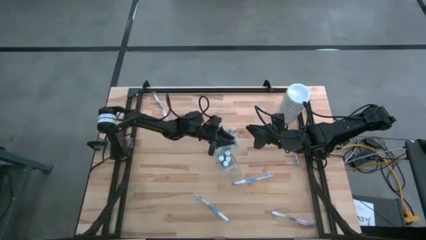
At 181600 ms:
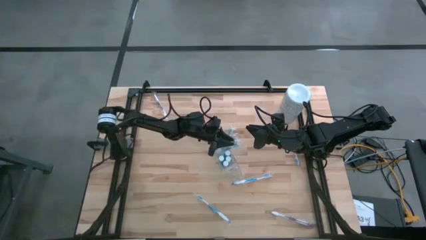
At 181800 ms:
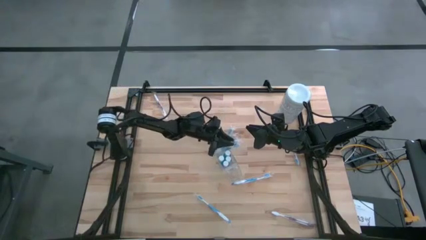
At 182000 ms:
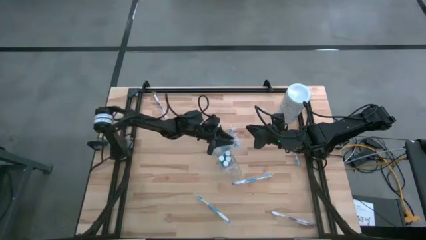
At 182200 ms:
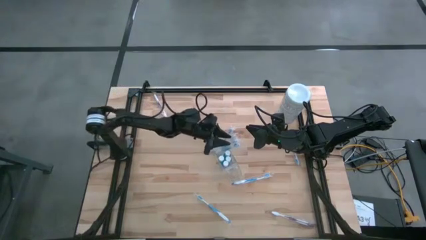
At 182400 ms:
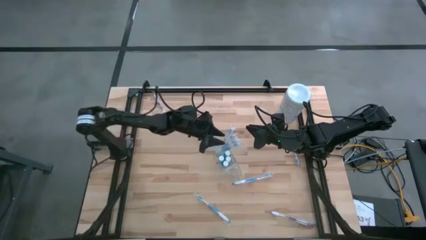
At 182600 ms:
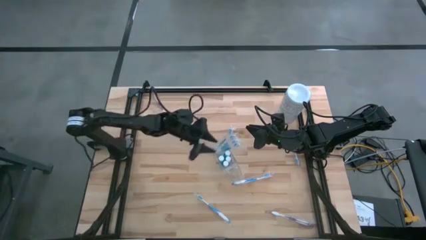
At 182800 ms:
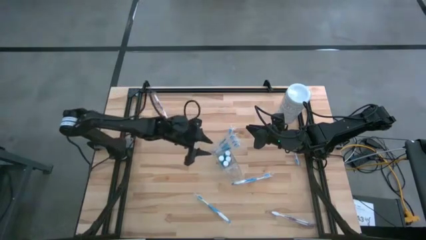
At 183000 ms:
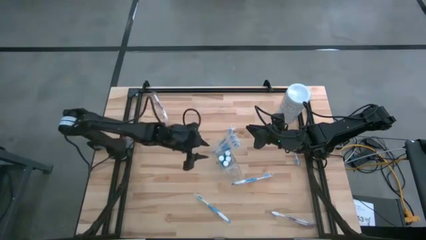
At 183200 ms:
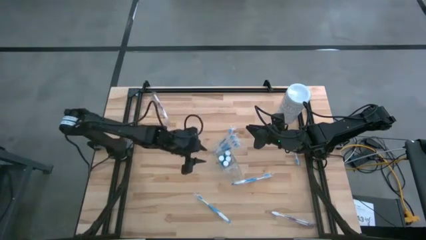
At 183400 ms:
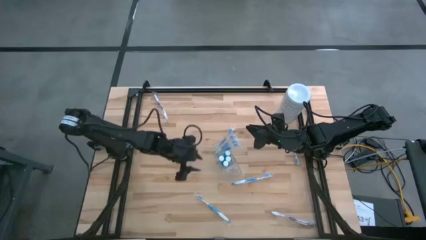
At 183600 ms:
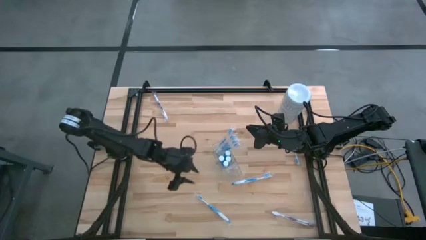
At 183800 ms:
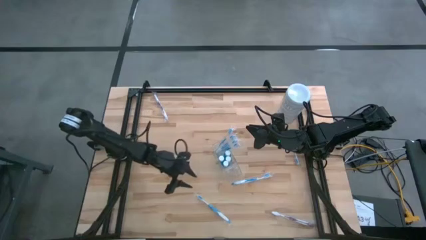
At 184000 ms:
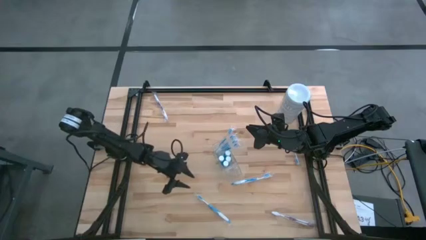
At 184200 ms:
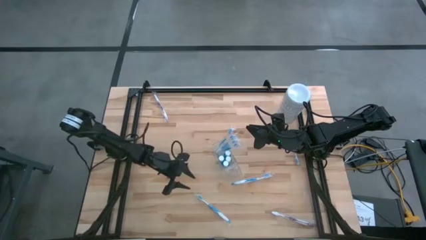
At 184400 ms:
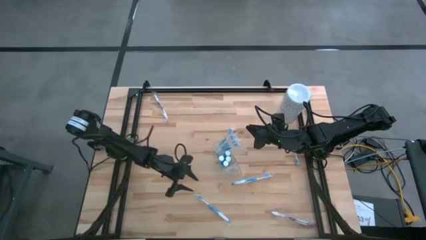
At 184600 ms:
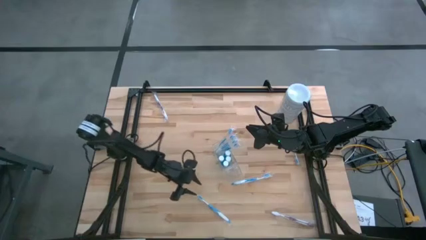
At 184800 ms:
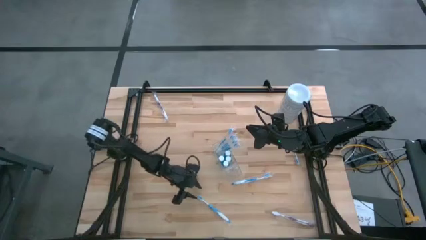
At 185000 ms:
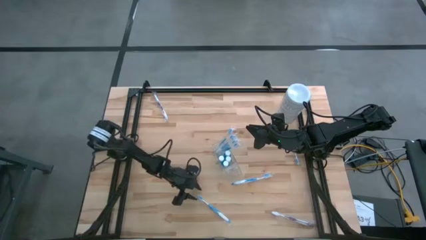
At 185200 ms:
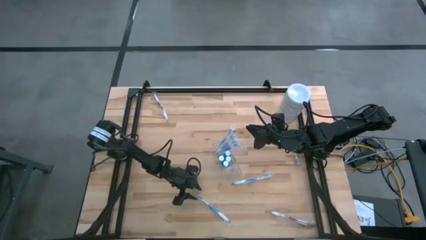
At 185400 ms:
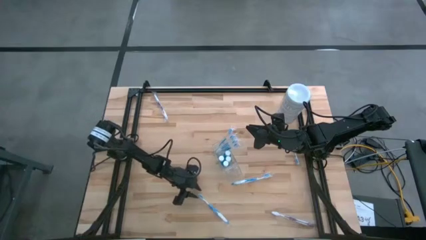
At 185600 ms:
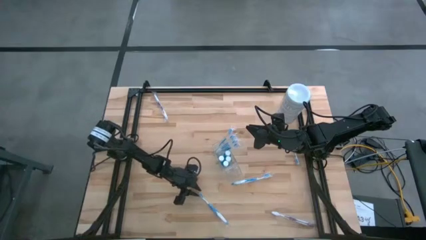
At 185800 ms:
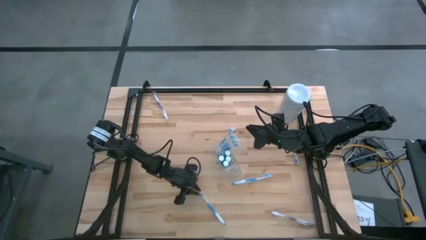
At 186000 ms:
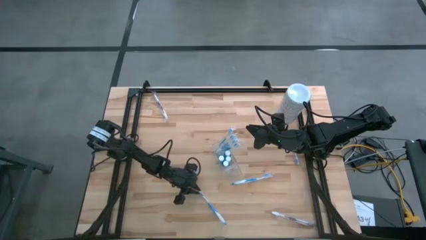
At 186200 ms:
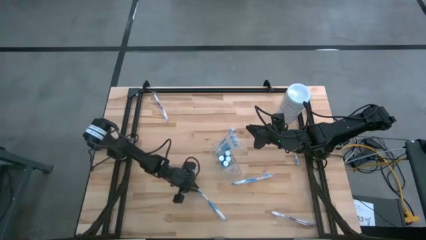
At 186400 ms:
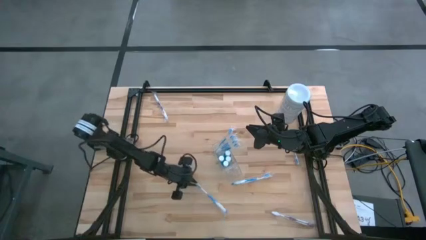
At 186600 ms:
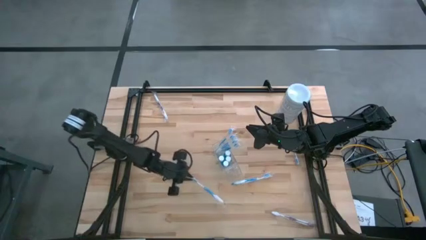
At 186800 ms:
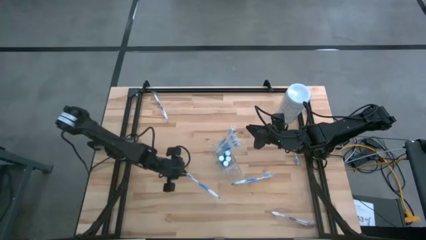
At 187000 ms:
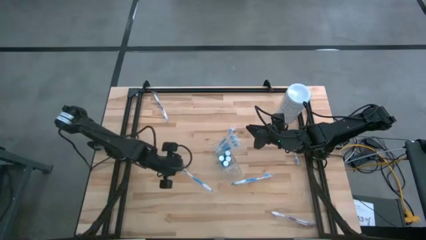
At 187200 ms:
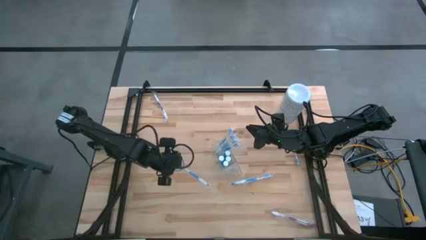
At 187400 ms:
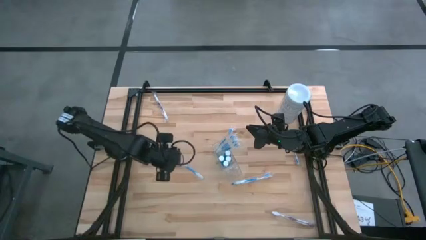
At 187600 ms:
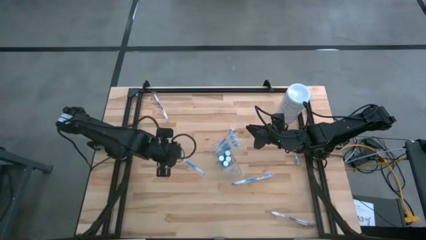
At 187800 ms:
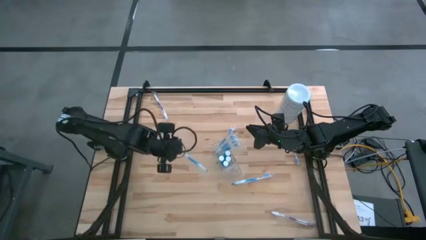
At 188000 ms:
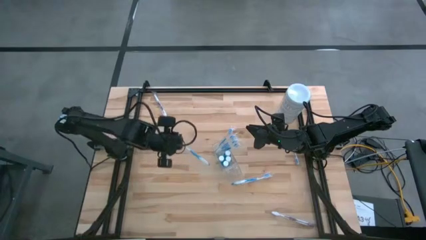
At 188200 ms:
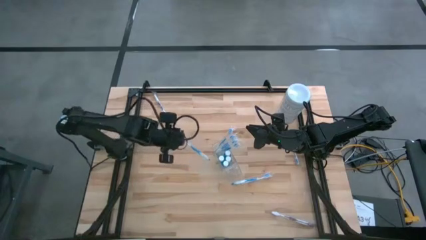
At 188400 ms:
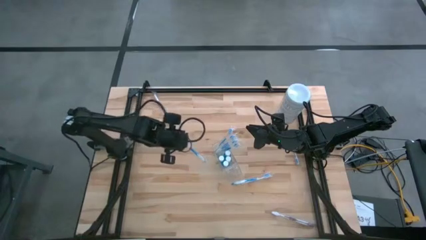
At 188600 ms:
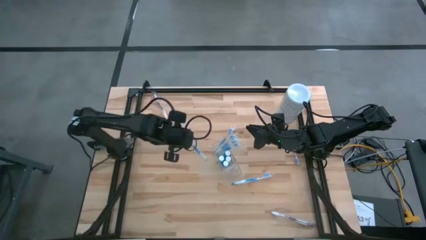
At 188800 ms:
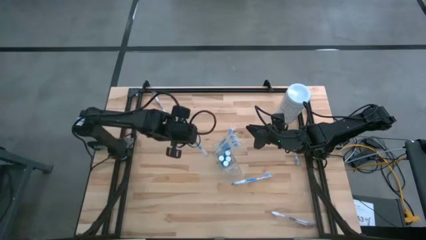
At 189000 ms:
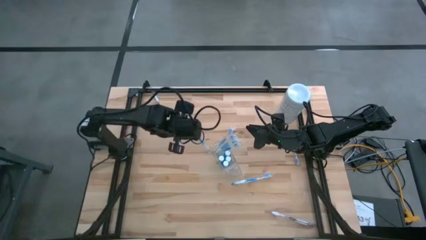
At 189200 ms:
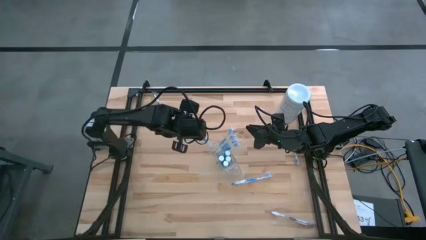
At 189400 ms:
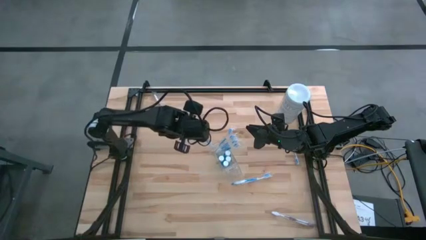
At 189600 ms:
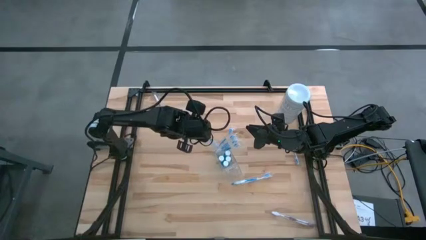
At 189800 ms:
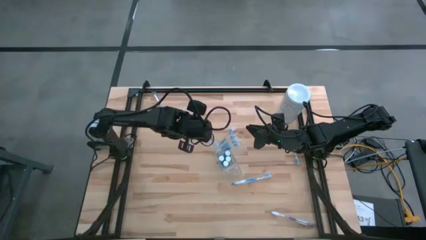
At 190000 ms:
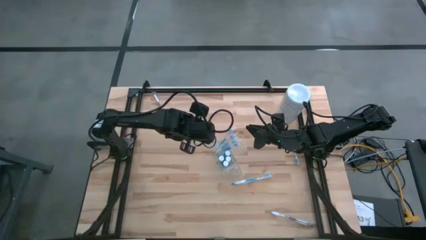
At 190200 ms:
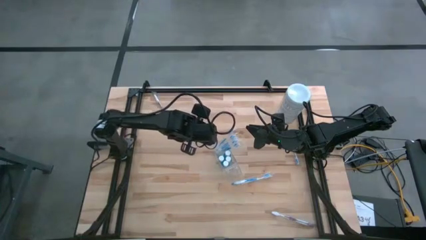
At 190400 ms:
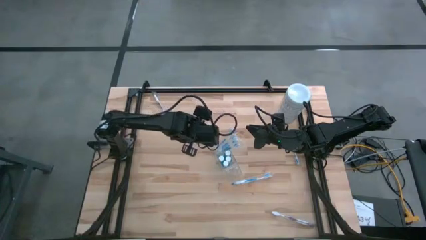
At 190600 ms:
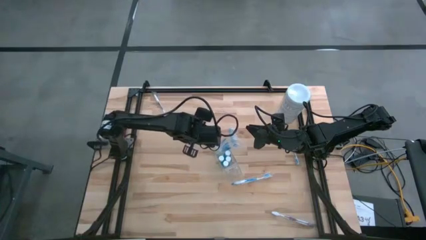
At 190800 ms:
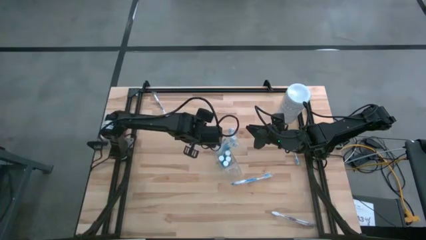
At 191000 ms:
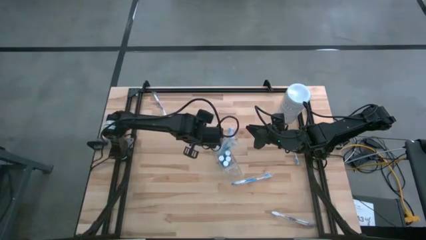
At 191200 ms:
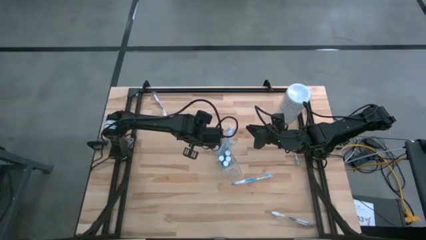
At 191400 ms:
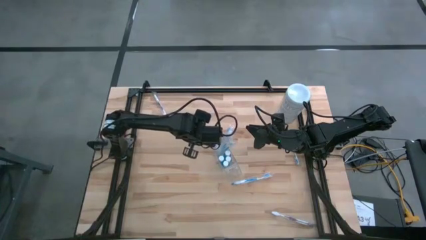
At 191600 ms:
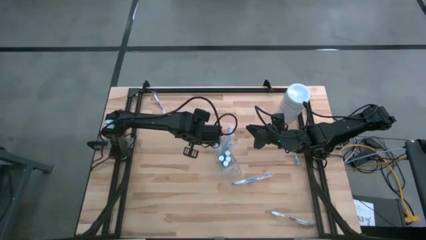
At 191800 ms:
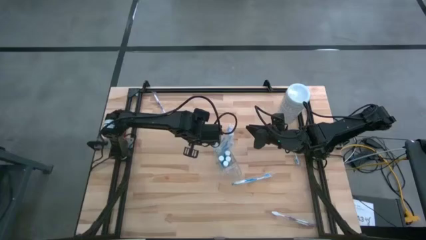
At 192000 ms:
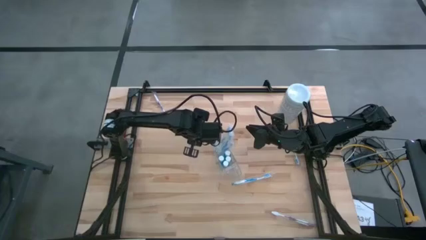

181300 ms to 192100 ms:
Task: Pick & Place toothbrushing station
Put the blue toothbrush into the left section of the transparent organizer
